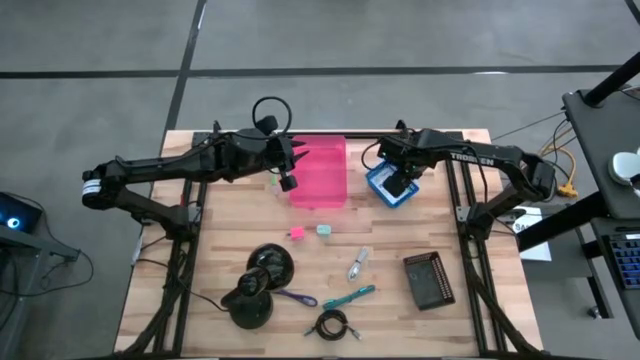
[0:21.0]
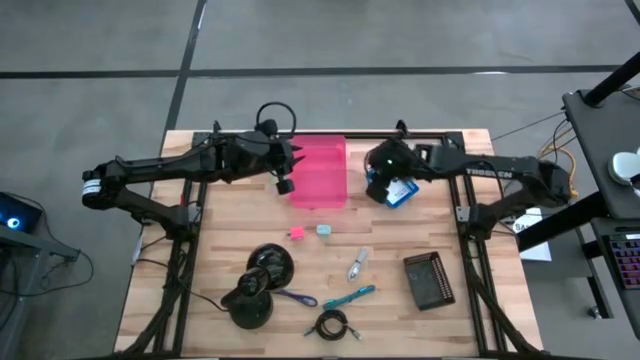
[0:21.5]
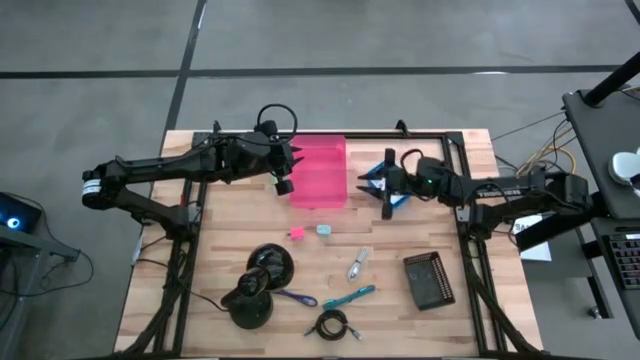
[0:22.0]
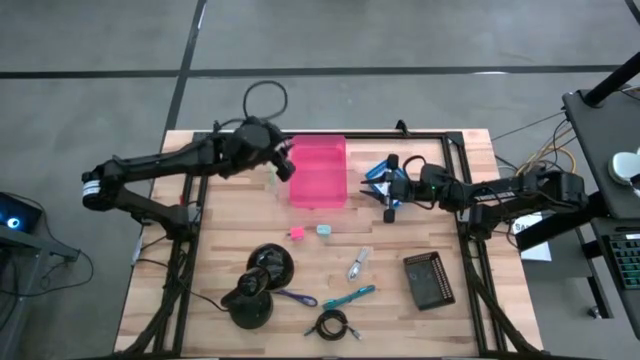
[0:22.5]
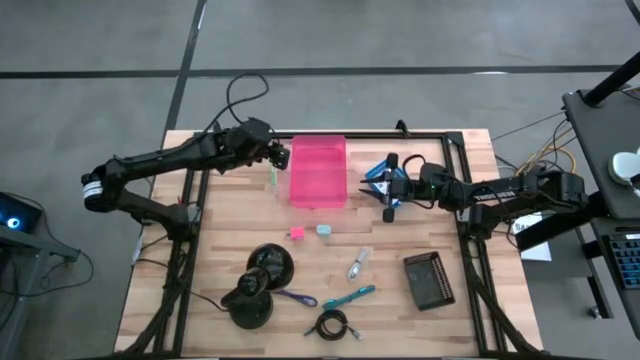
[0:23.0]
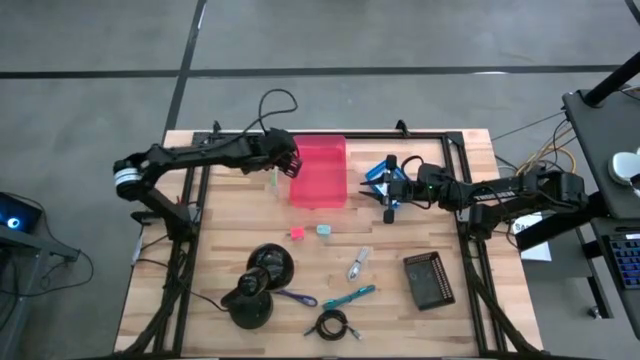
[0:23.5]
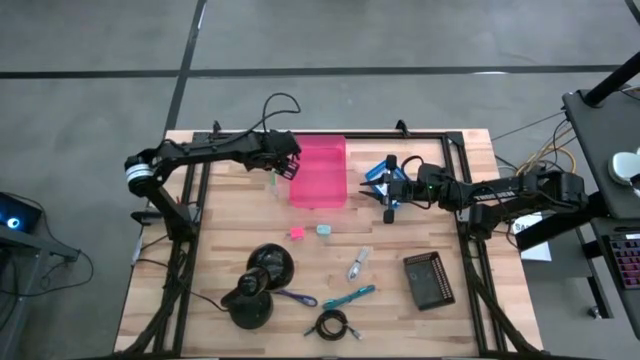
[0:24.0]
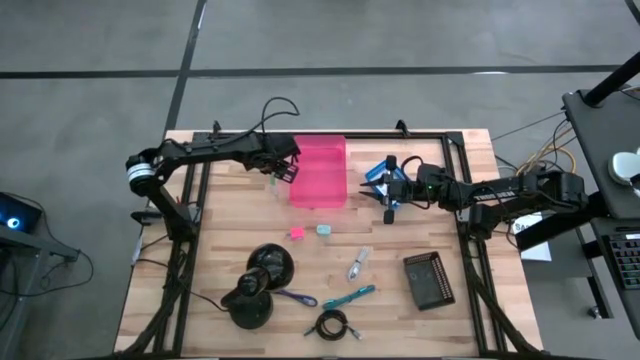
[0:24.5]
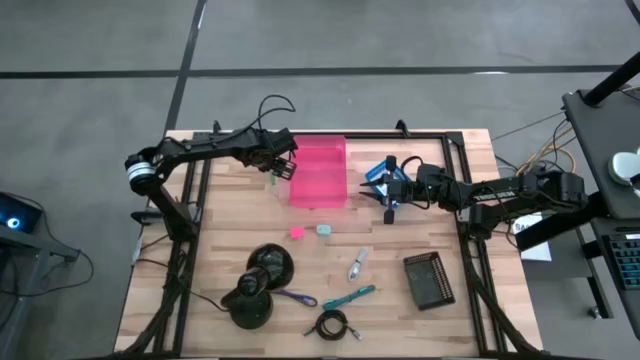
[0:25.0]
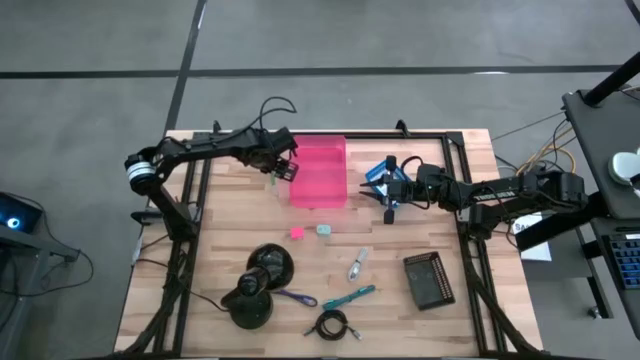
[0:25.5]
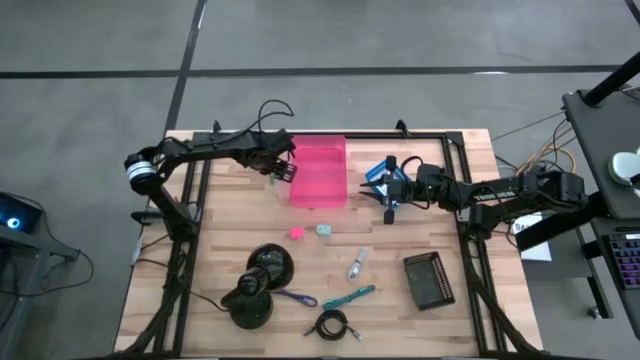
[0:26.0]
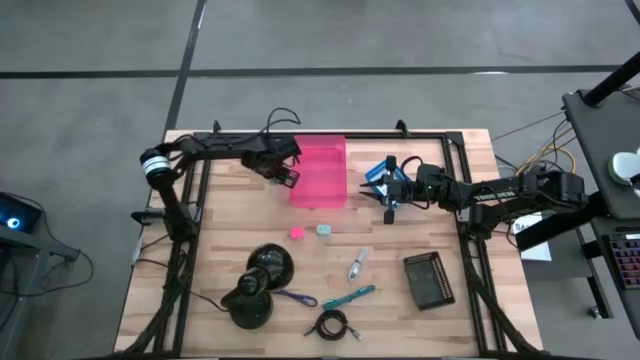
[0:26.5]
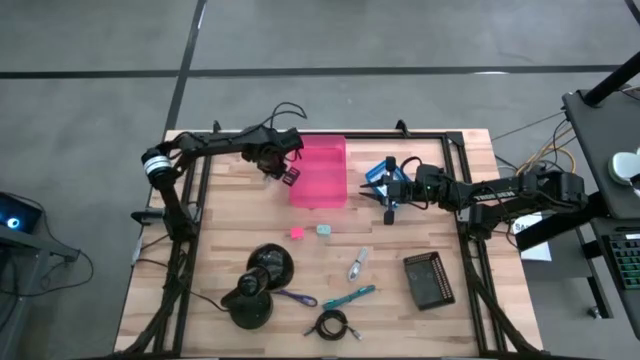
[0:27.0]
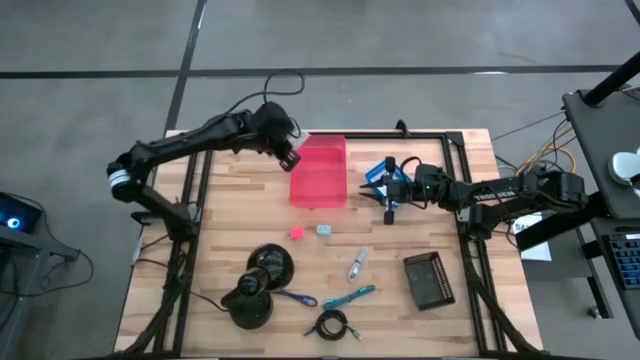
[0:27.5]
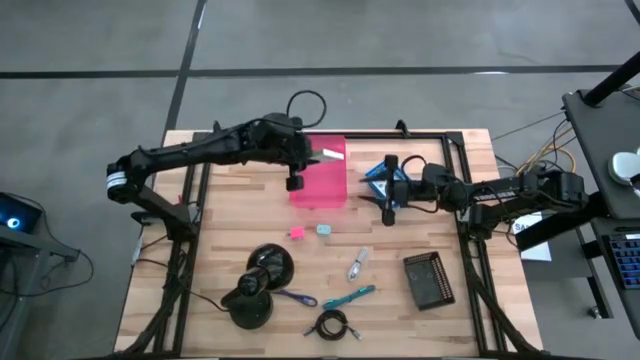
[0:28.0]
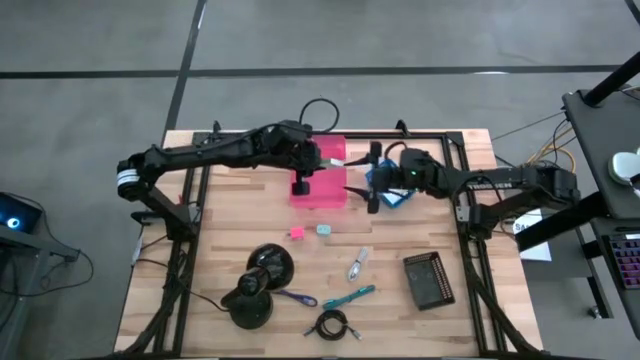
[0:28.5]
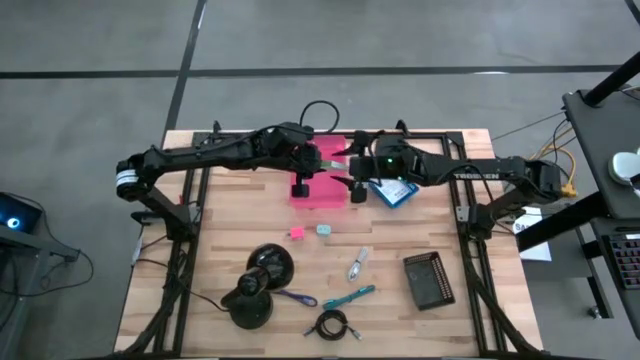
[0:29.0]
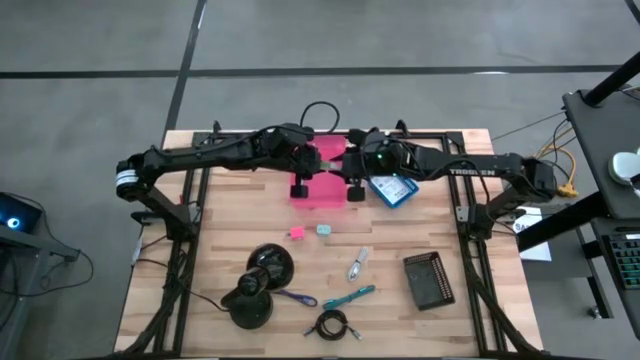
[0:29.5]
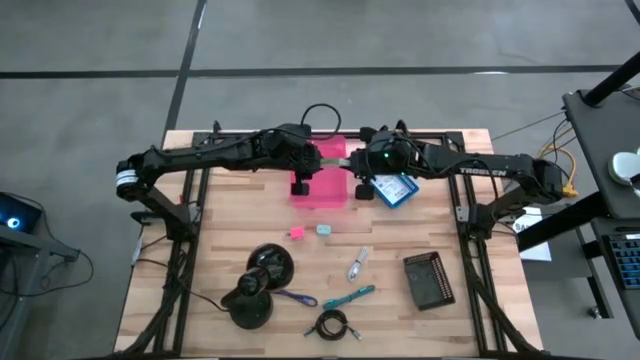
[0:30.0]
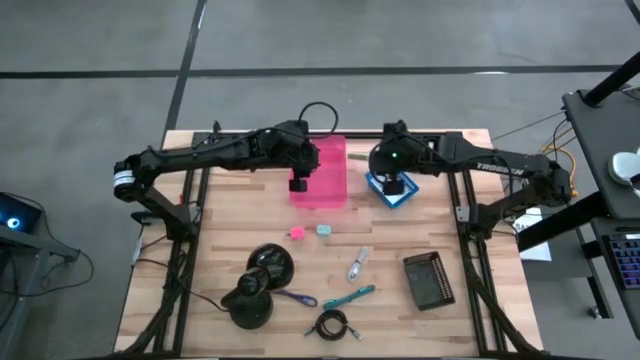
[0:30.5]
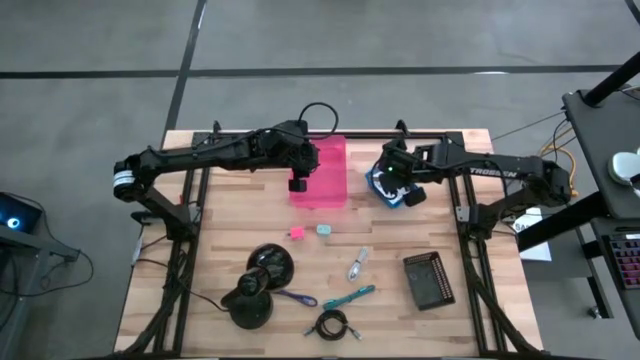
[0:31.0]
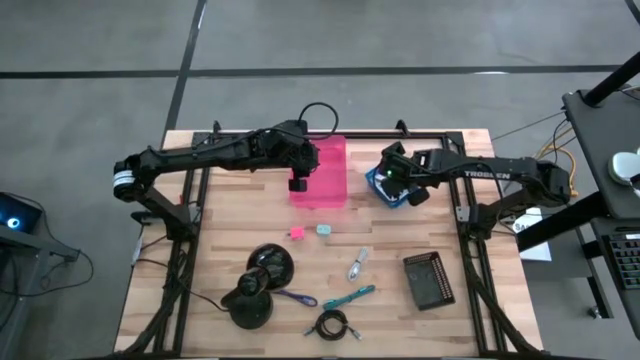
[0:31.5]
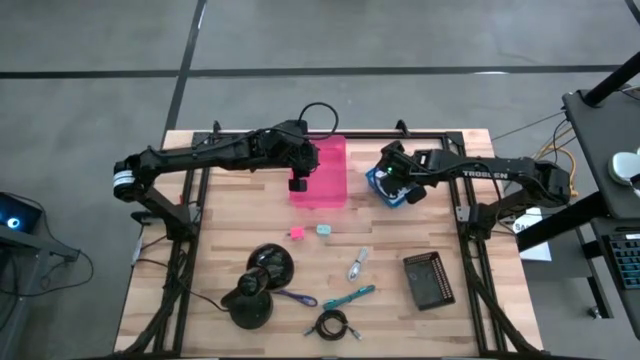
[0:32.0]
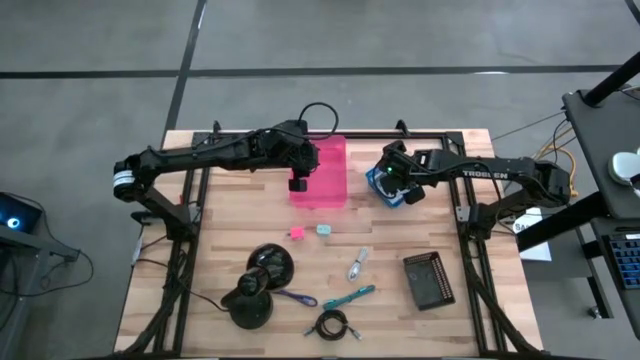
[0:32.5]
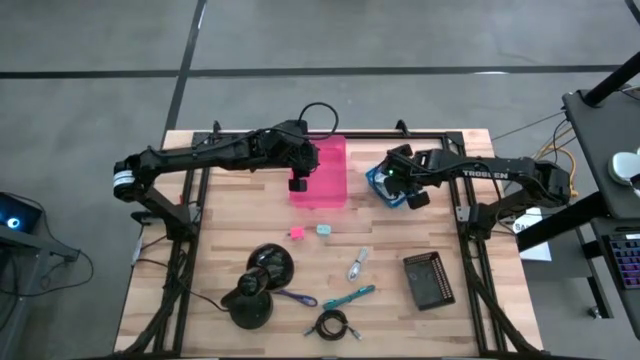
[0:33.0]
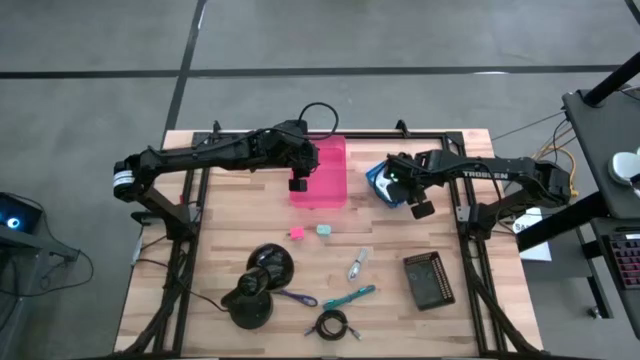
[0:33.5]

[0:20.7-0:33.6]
Task: Pick and place items into bin
Put the card reader box into the blue bin

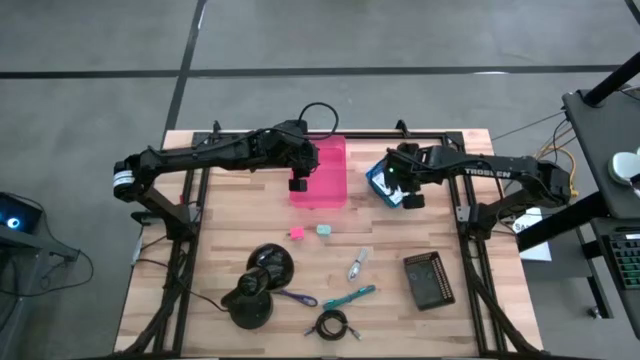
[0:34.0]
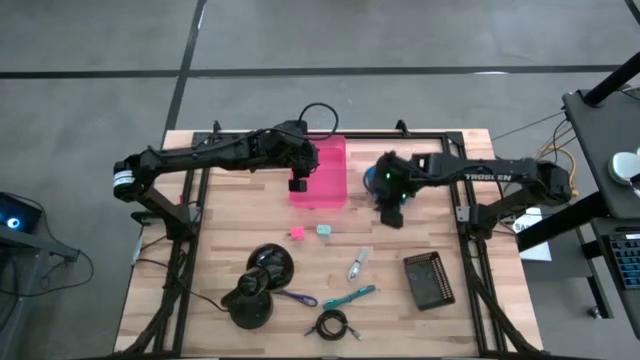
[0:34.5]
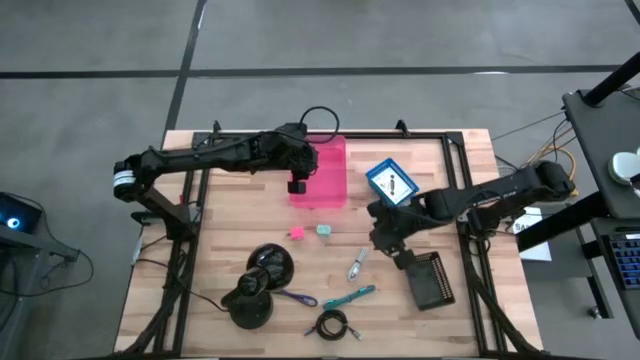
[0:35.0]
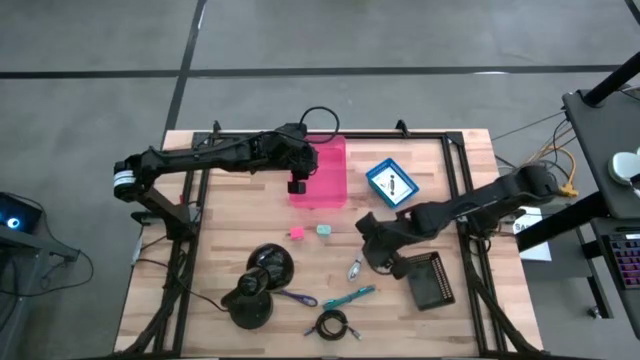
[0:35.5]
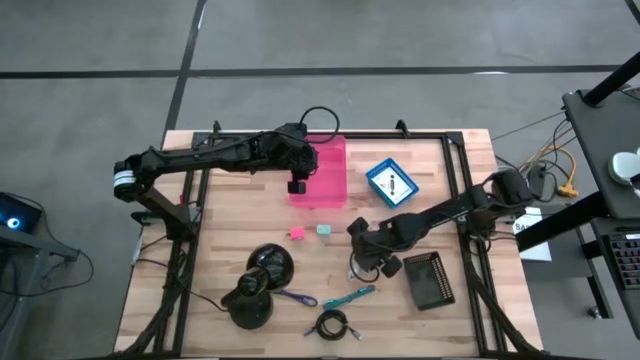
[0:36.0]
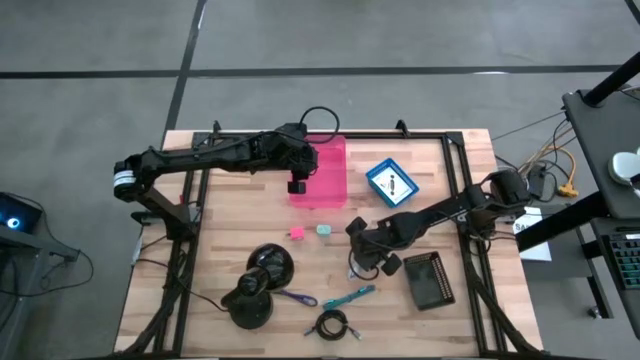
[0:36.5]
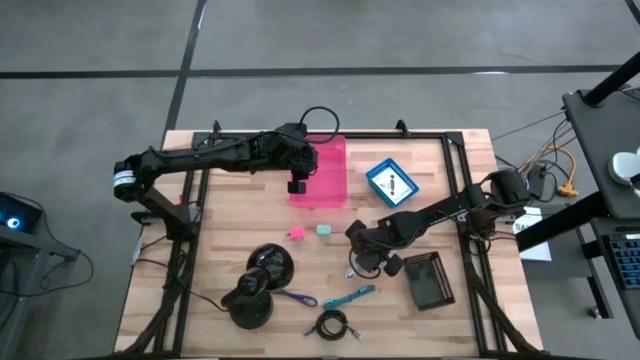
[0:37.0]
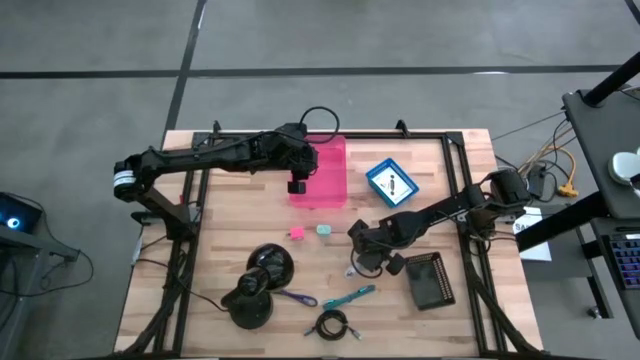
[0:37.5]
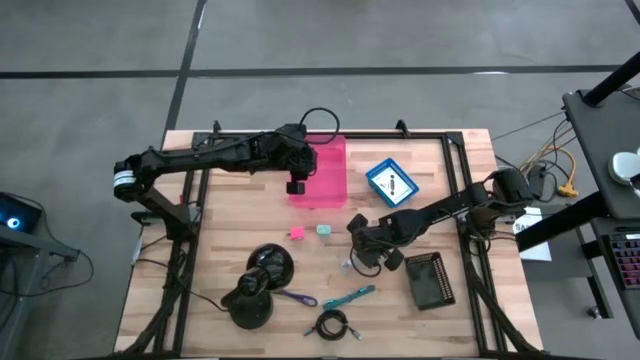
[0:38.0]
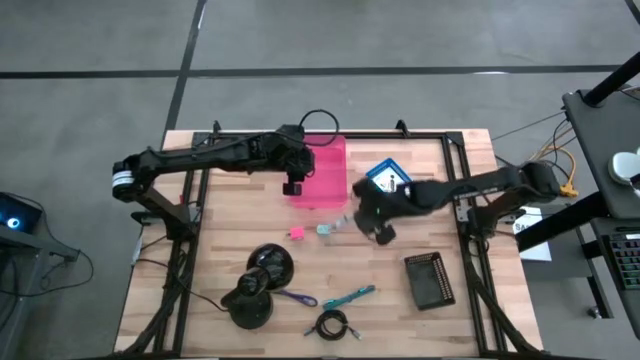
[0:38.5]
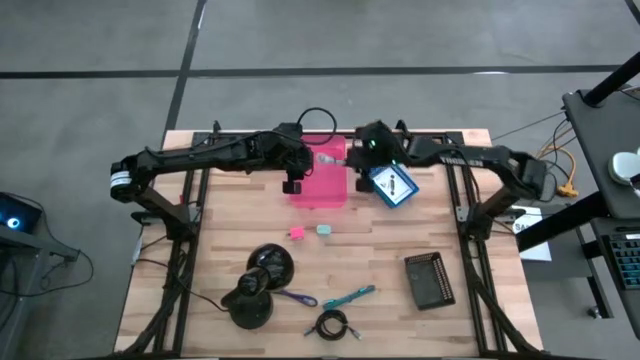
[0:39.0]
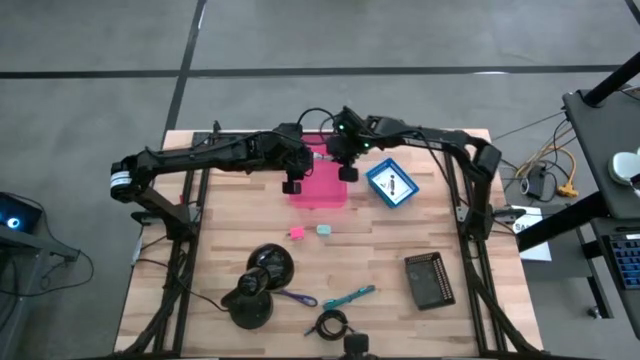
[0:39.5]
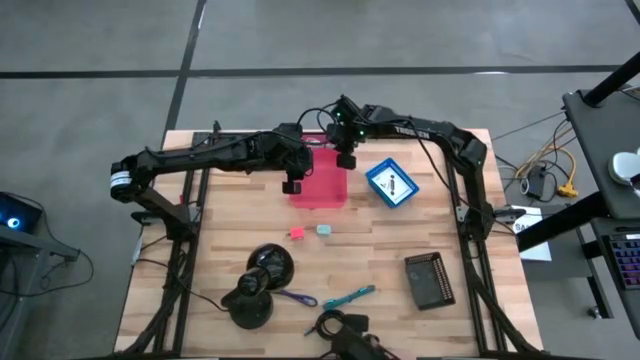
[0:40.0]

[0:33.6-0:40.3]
Put the white charger cable into the pink bin

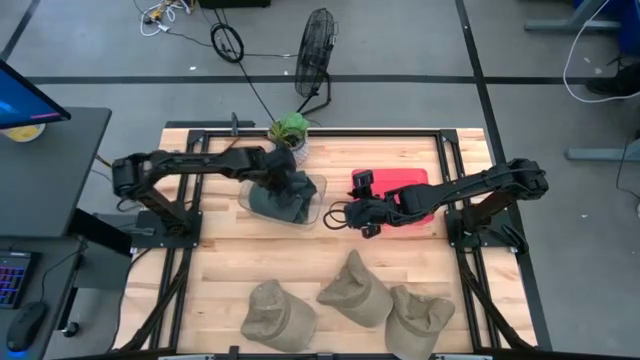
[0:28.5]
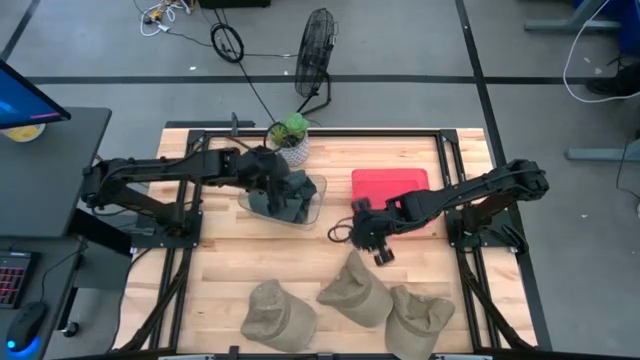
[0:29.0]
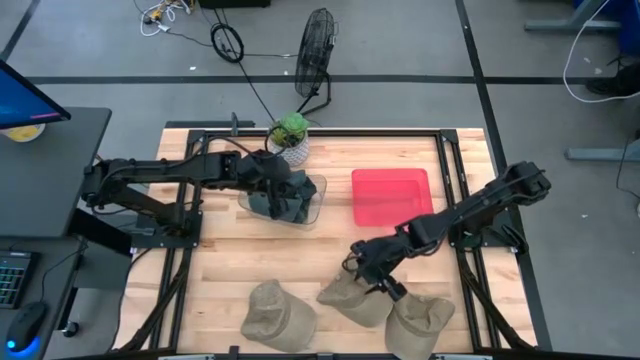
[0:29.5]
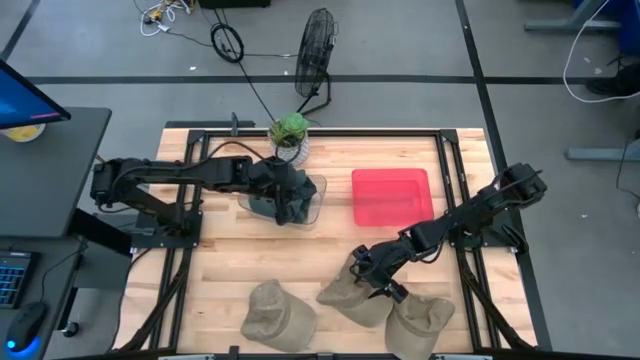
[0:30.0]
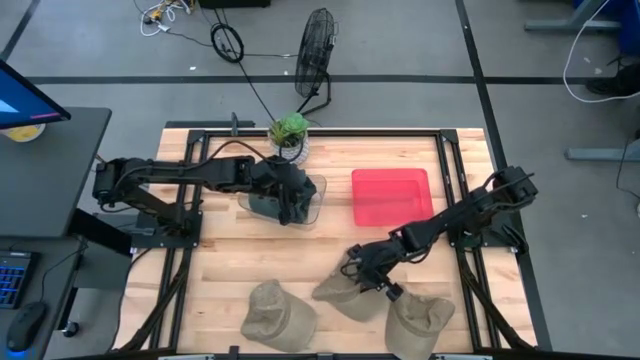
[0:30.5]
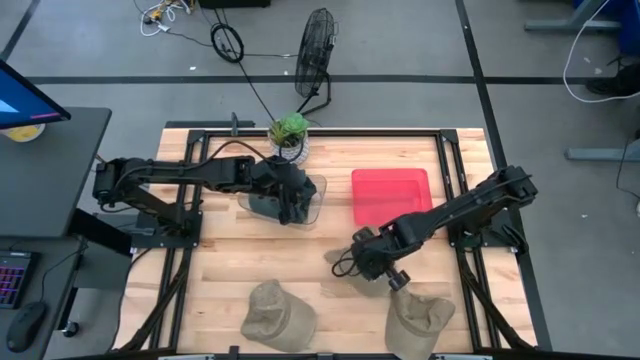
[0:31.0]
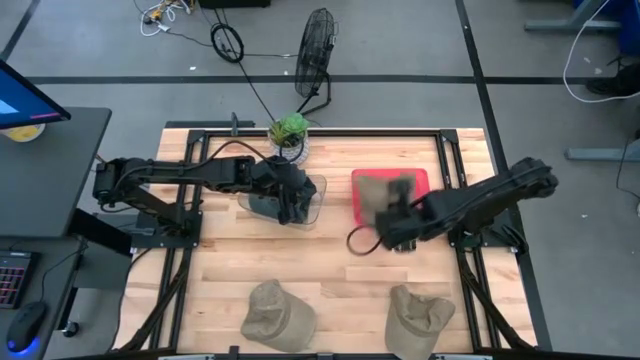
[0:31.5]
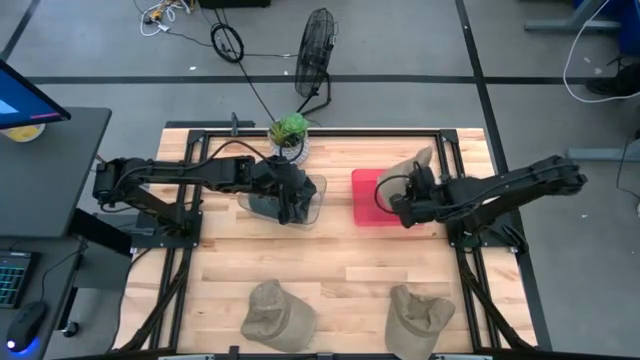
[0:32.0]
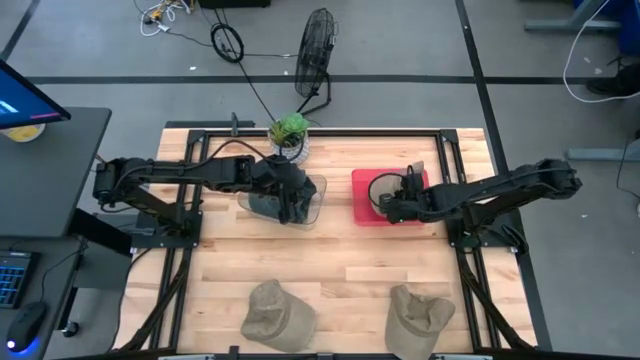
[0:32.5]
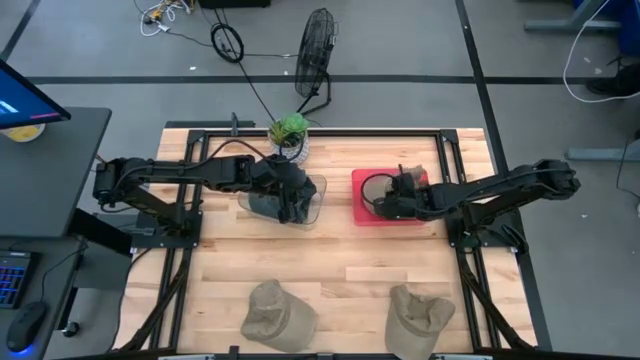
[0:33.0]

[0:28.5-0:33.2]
Task: Pick & Place hat
Put the middle brown cap into the red bin
